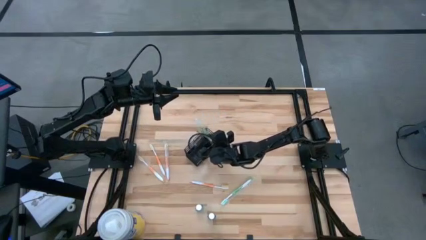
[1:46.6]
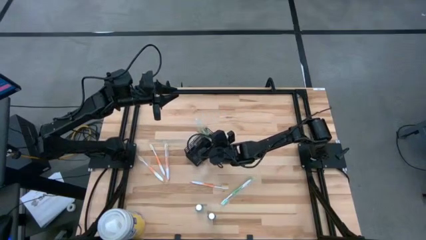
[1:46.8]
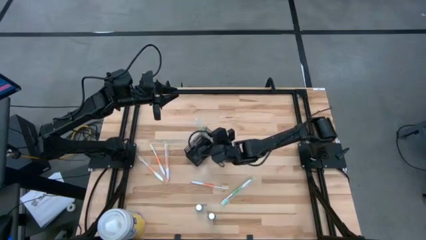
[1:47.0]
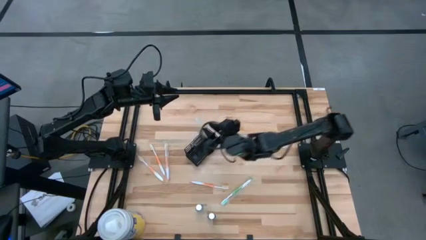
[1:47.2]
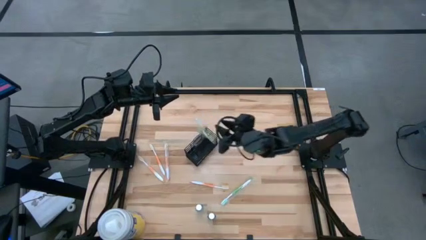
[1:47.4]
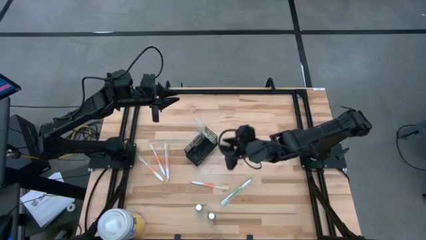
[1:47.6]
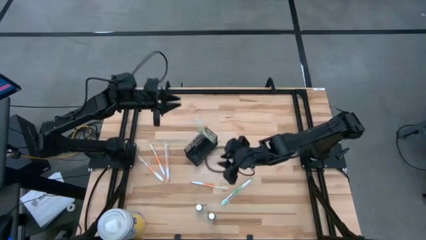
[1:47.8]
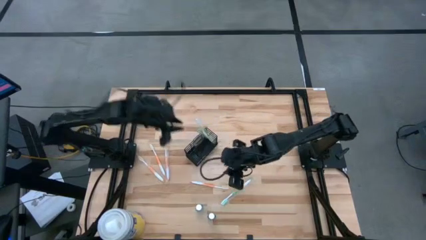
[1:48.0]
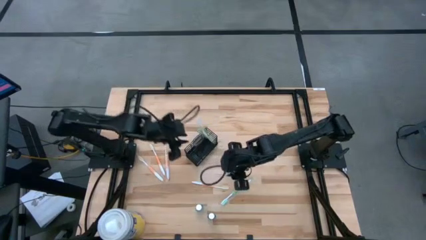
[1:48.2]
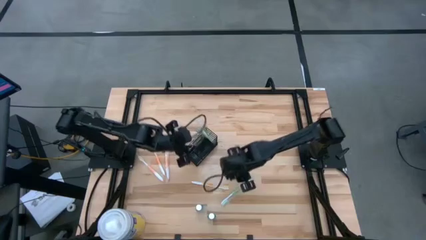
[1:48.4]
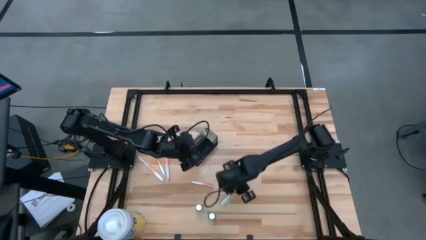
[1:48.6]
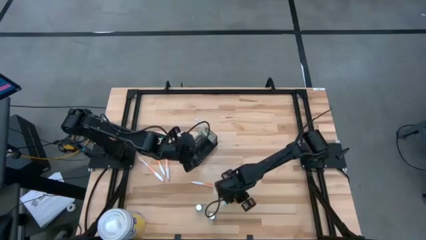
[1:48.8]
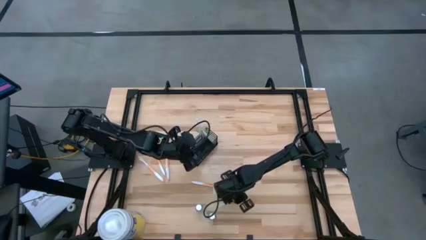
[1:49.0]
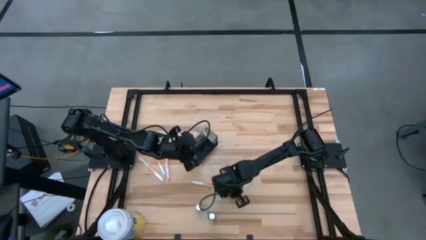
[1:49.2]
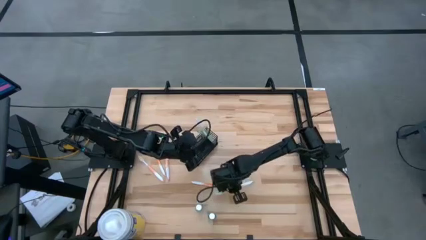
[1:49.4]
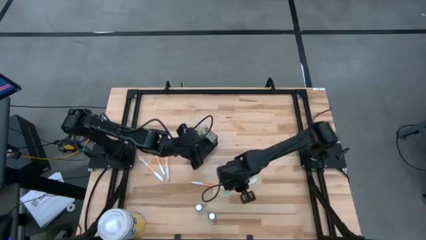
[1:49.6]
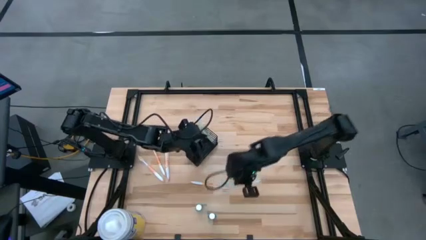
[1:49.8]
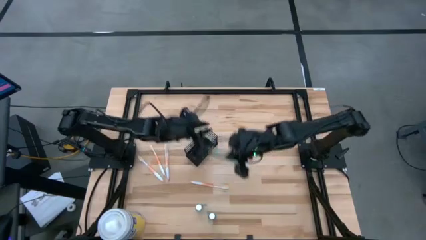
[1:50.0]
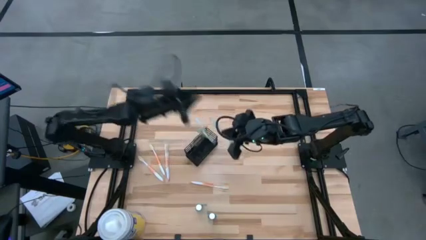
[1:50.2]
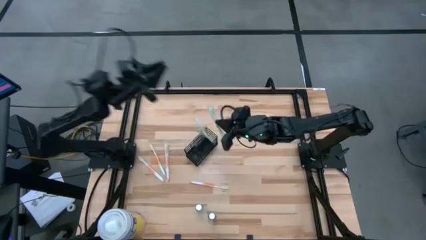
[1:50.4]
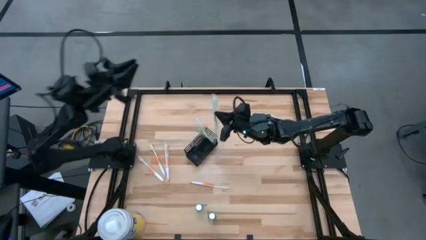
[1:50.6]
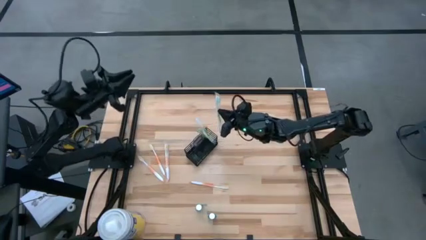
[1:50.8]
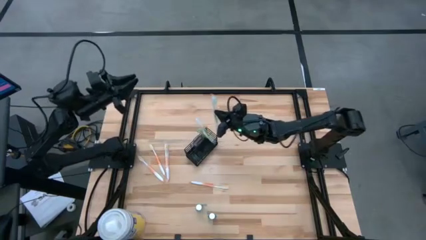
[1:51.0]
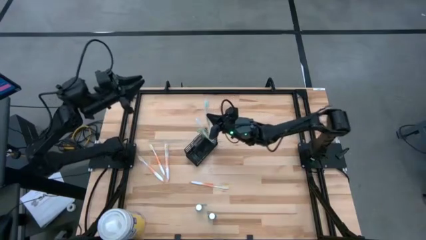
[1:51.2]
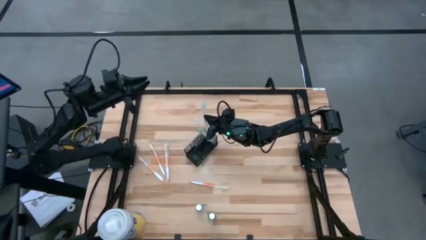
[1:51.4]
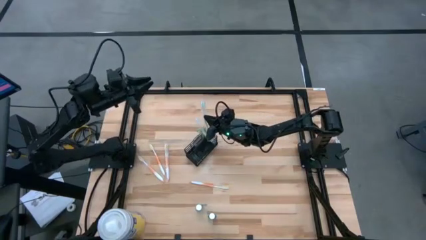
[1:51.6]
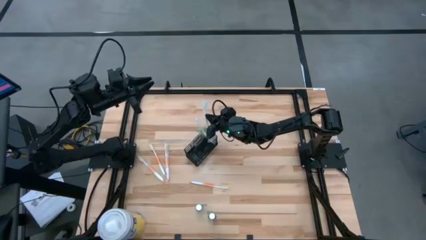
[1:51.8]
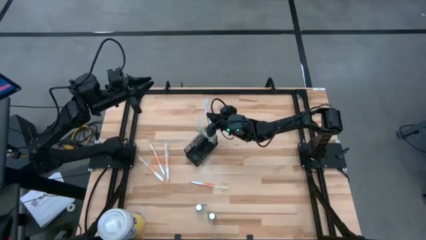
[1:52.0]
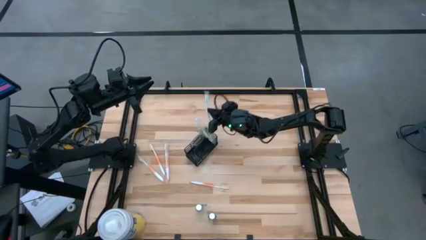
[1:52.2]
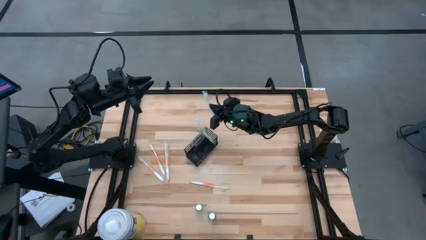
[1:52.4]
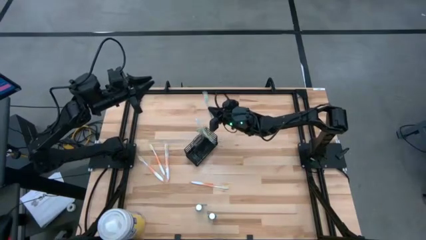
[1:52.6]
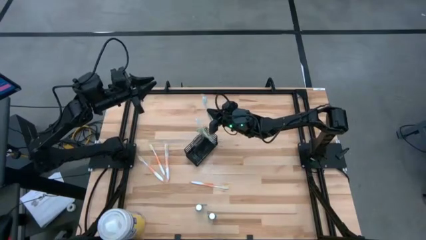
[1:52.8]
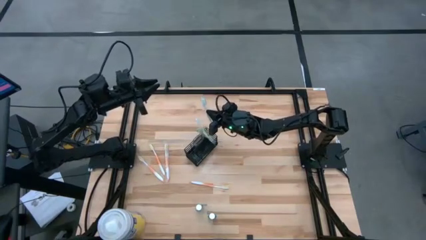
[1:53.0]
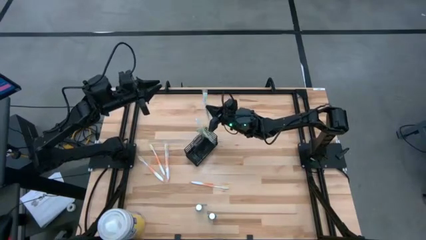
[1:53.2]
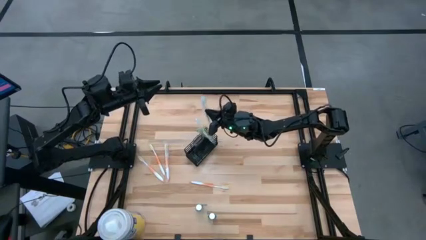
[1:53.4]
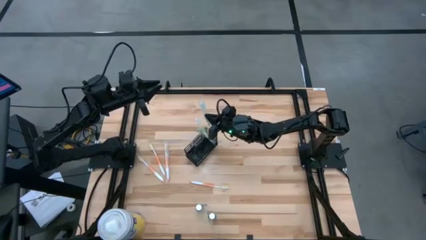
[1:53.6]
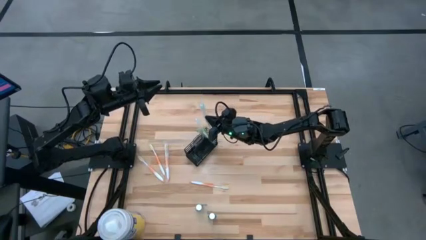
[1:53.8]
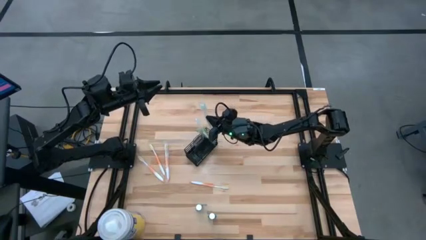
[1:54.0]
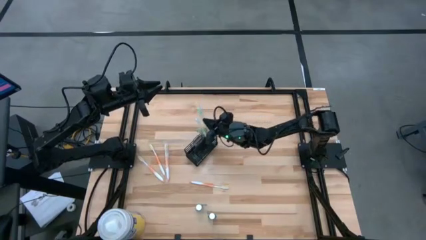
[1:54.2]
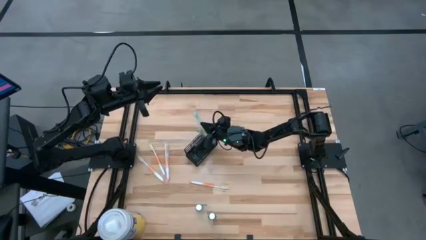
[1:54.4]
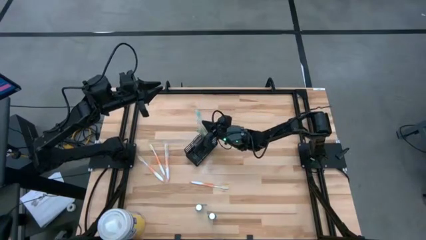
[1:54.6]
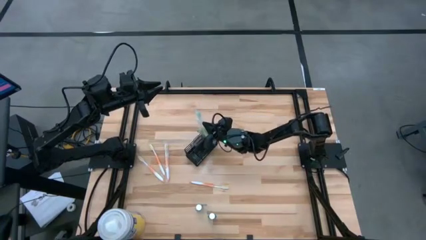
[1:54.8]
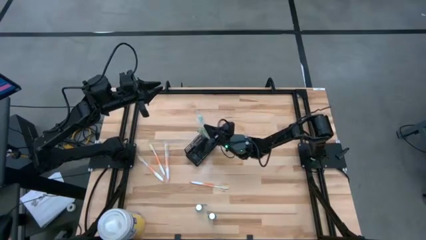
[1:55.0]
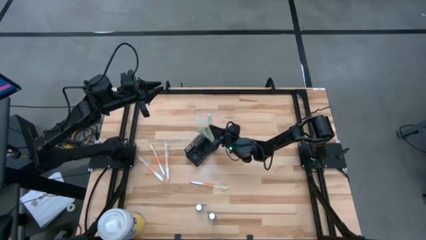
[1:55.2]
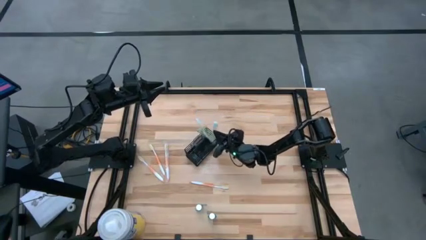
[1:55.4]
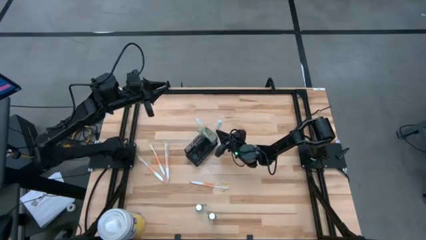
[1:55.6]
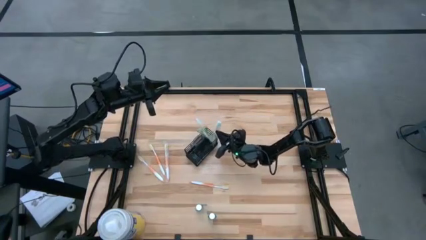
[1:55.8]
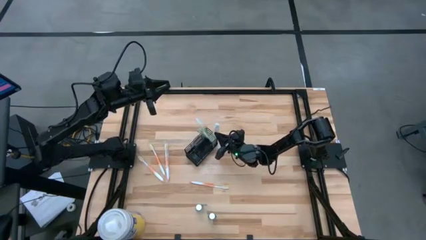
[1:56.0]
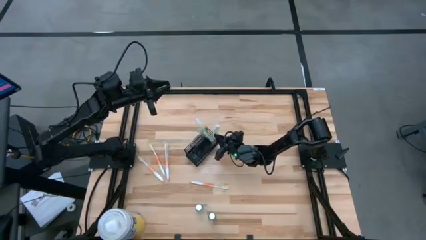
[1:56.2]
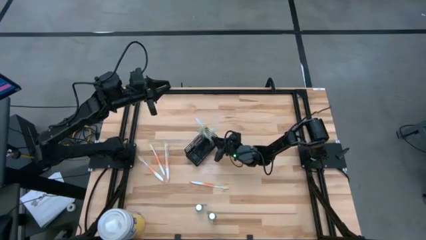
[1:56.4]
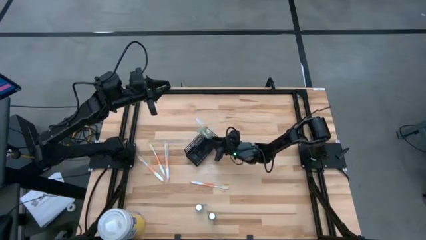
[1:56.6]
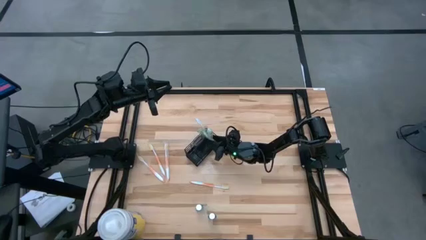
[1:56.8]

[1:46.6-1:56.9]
Task: Pick & Place toothbrushing station
Put the green toothbrush into the wire organizer

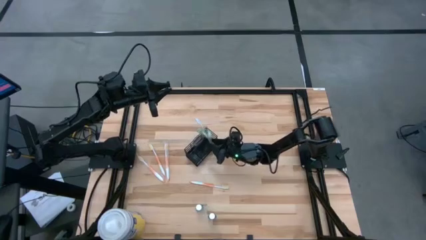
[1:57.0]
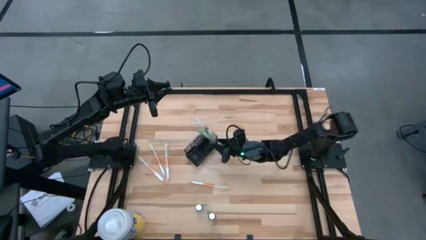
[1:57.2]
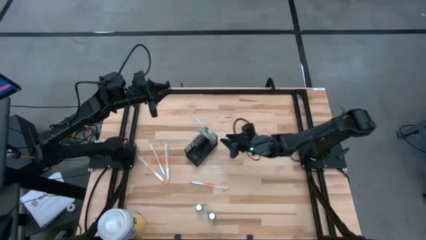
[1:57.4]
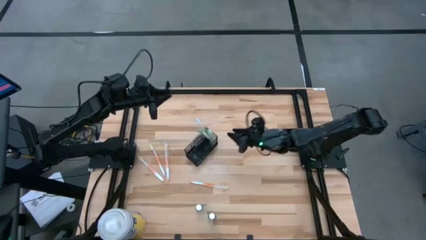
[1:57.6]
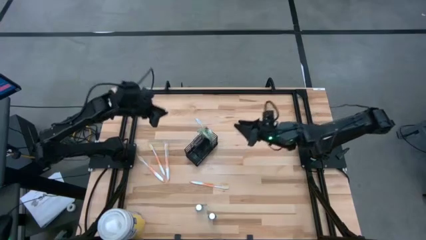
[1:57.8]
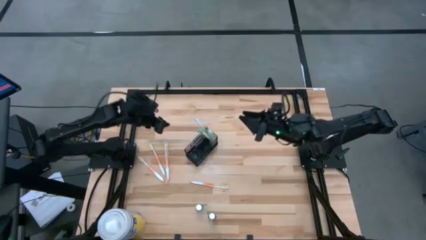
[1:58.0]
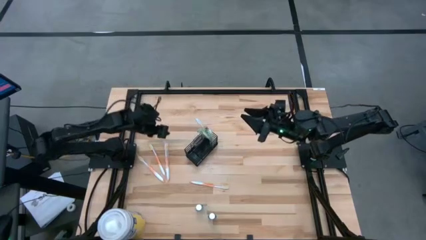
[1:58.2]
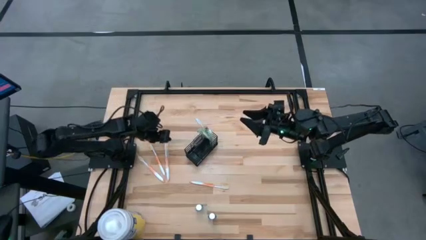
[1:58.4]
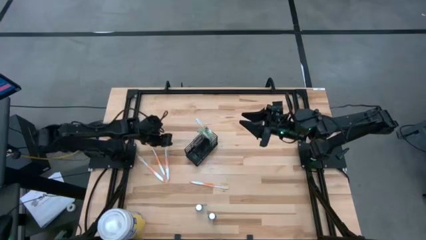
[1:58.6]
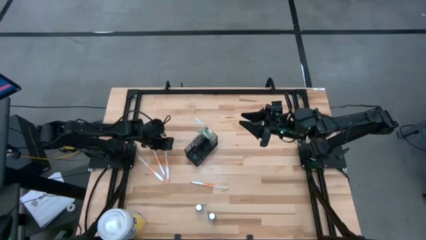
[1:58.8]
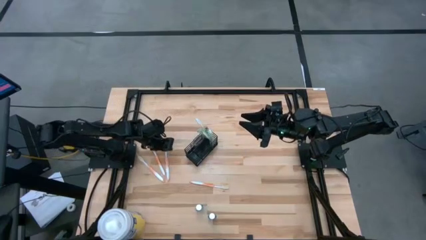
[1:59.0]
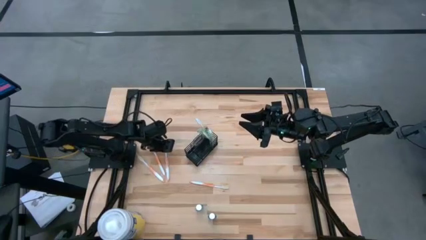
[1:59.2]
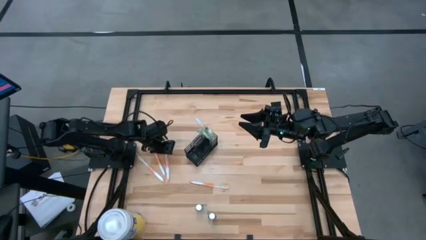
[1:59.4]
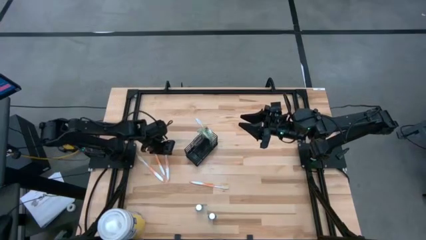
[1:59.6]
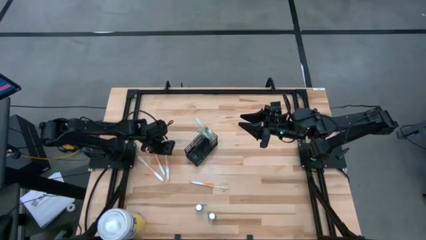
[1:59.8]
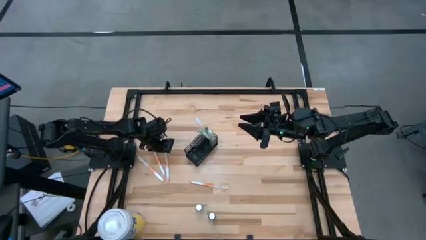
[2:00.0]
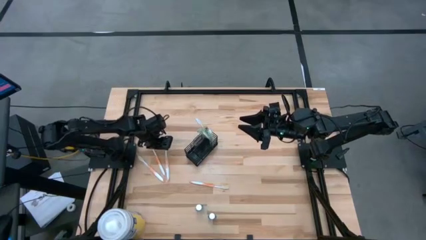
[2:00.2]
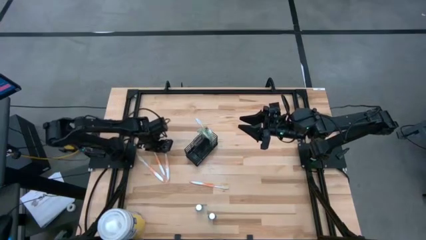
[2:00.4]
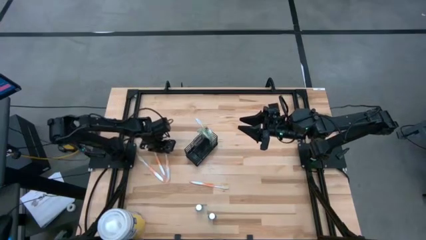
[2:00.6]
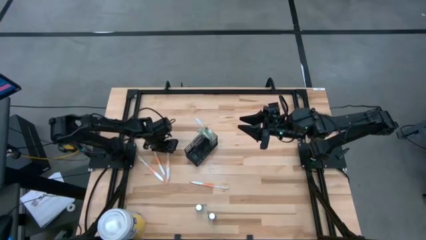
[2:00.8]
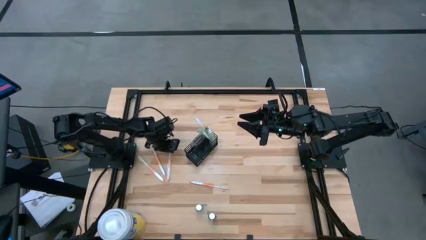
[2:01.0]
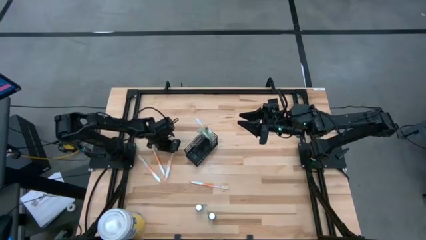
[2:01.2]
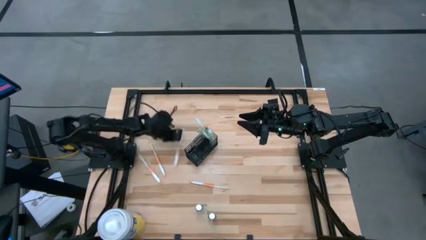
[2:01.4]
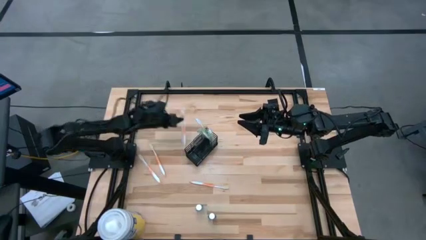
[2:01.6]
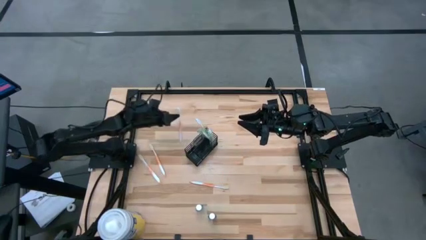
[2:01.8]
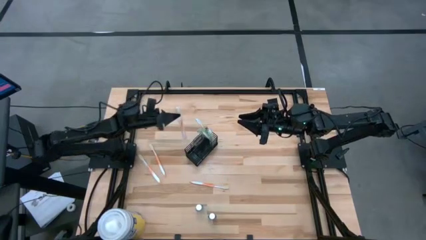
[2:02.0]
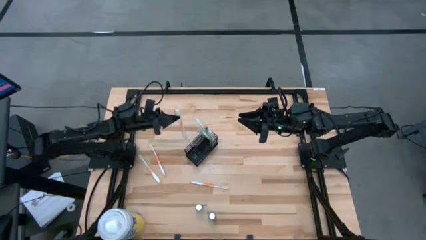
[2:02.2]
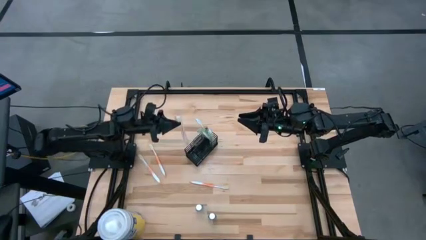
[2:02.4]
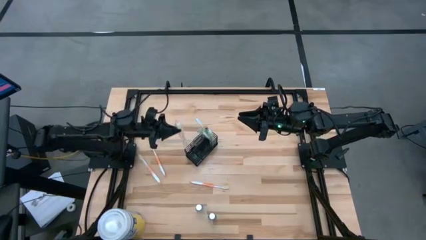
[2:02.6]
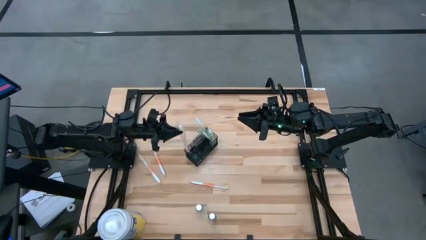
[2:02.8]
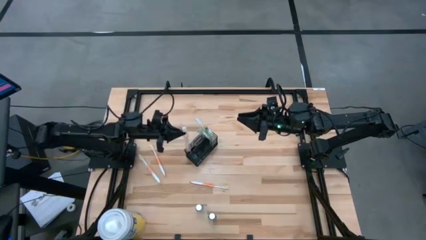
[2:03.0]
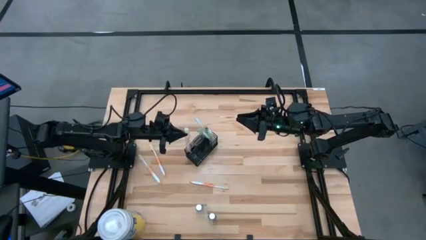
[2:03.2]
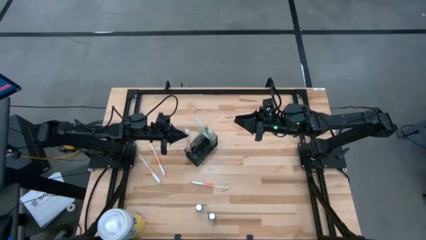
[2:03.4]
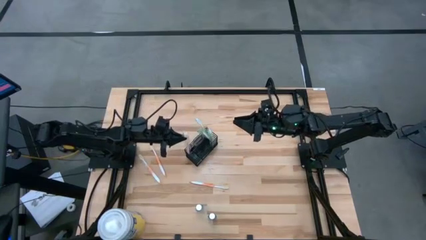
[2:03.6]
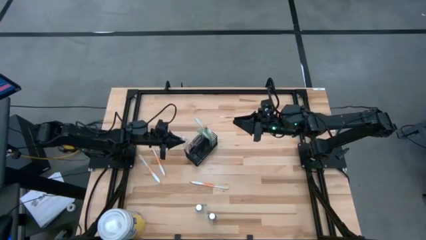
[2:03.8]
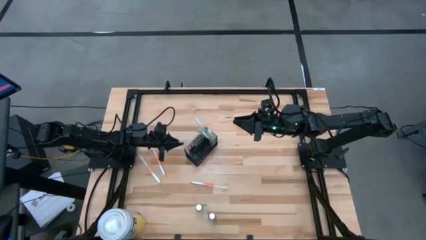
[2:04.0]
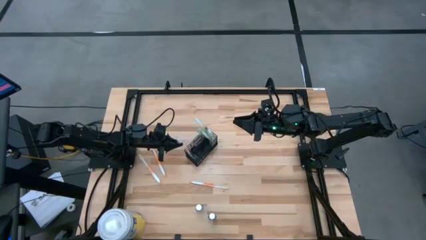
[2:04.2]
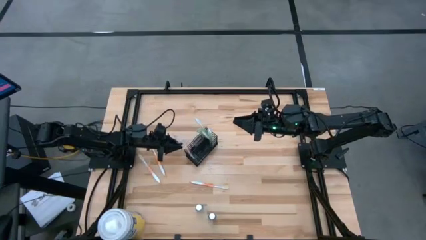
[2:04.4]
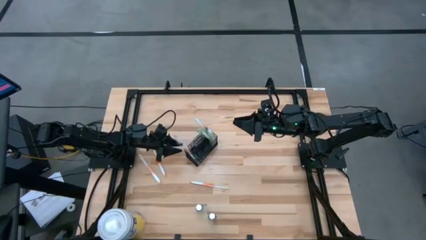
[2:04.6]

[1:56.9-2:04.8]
Put the orange toothbrush into the wire organizer
